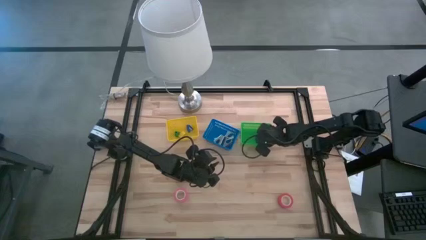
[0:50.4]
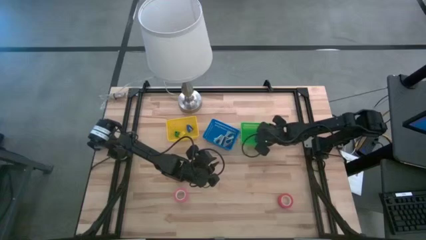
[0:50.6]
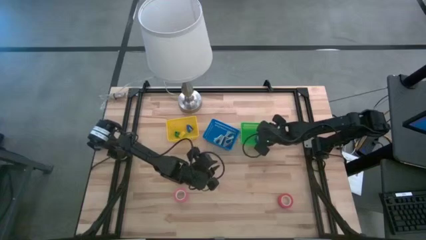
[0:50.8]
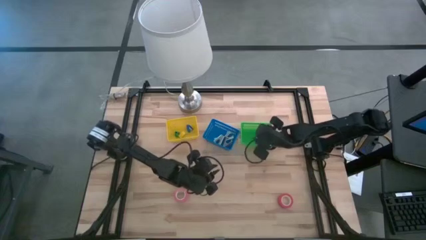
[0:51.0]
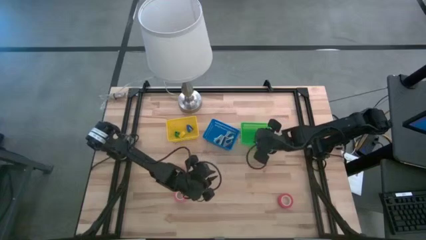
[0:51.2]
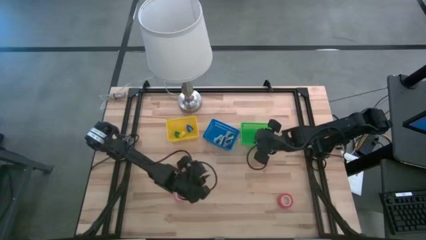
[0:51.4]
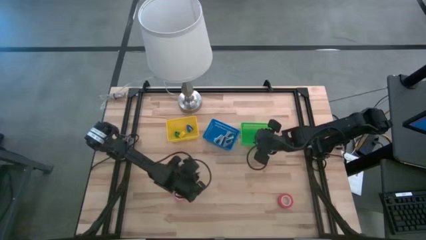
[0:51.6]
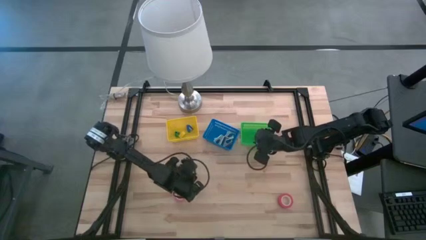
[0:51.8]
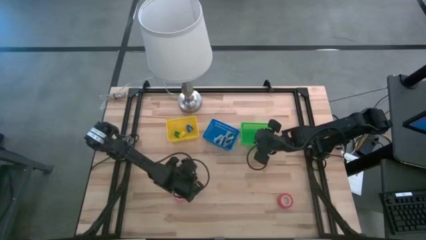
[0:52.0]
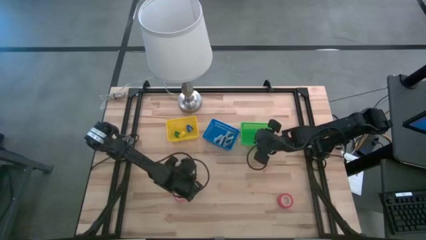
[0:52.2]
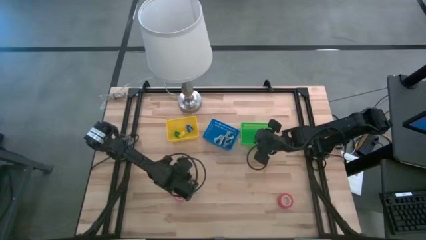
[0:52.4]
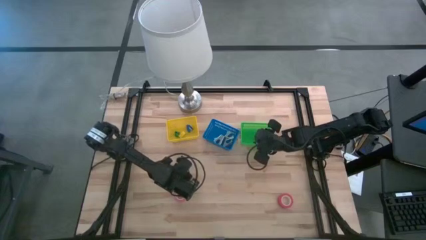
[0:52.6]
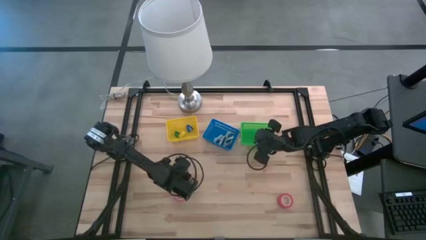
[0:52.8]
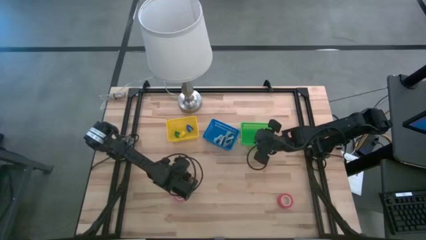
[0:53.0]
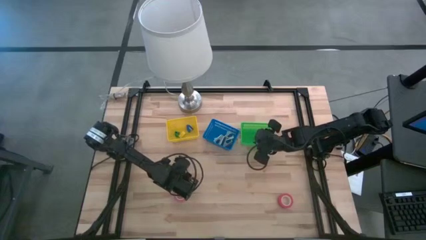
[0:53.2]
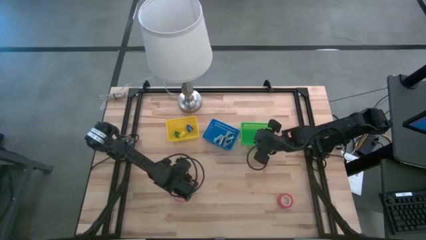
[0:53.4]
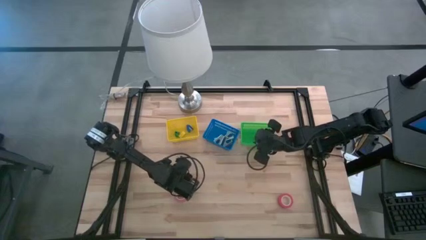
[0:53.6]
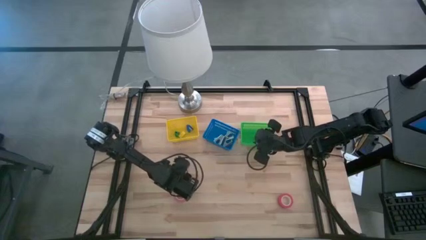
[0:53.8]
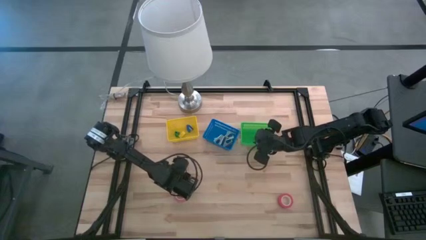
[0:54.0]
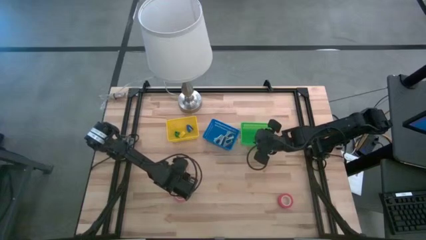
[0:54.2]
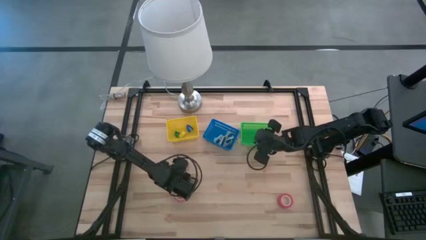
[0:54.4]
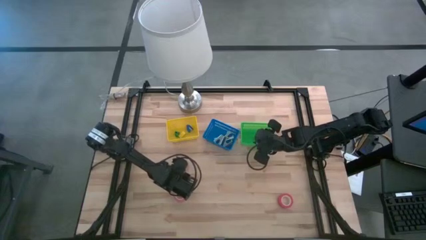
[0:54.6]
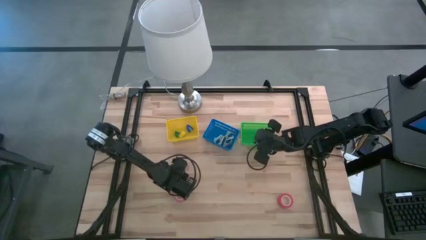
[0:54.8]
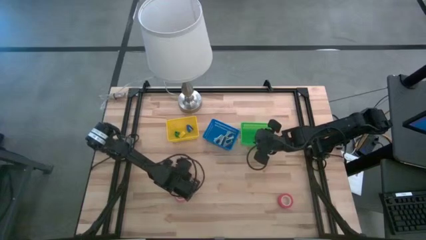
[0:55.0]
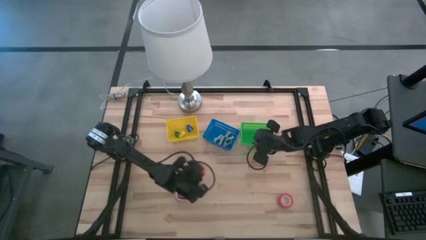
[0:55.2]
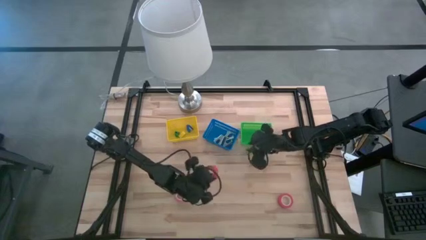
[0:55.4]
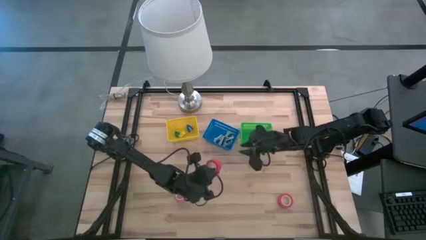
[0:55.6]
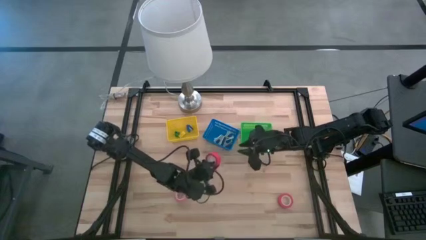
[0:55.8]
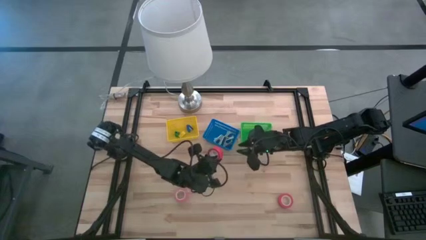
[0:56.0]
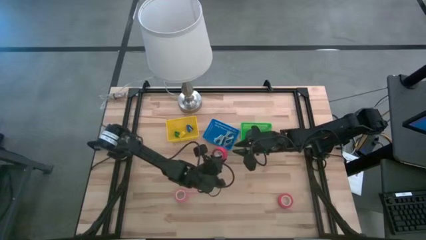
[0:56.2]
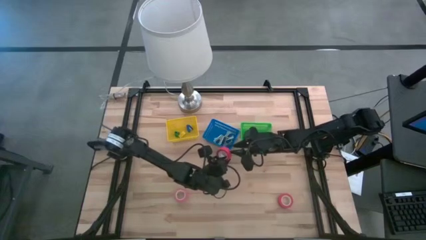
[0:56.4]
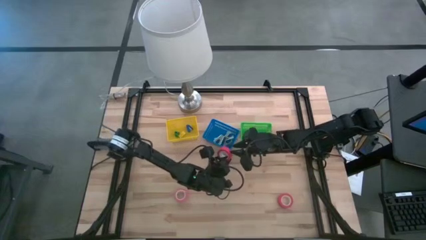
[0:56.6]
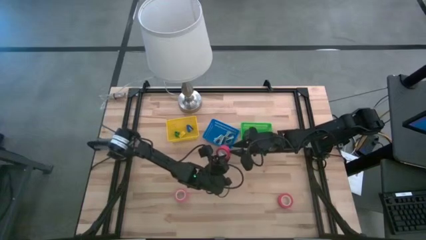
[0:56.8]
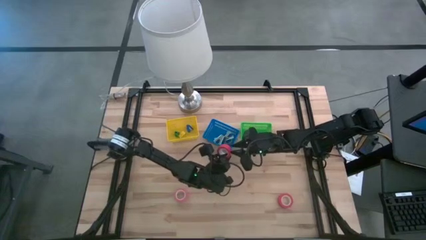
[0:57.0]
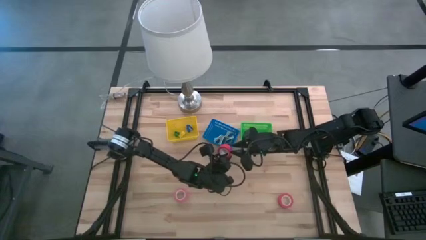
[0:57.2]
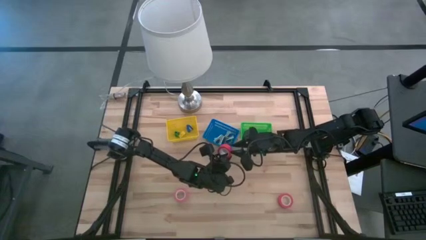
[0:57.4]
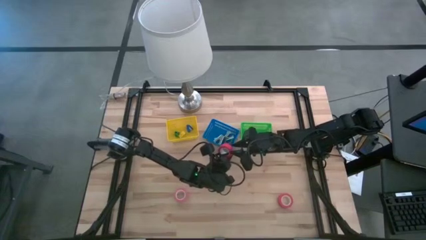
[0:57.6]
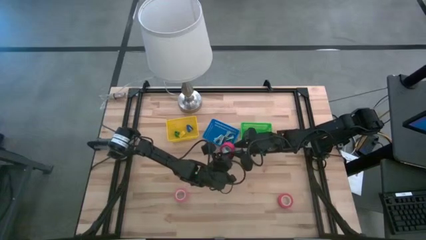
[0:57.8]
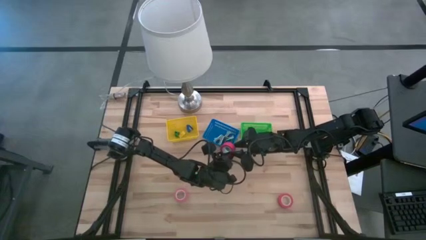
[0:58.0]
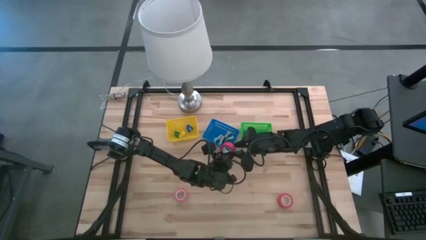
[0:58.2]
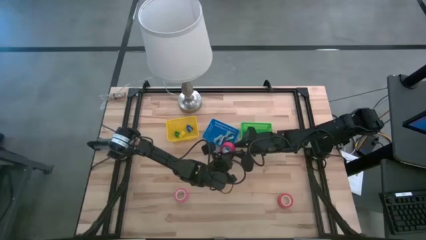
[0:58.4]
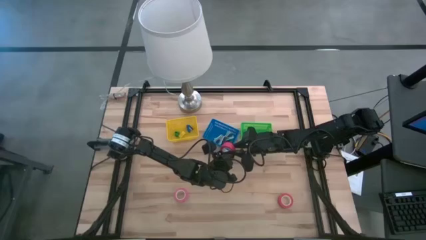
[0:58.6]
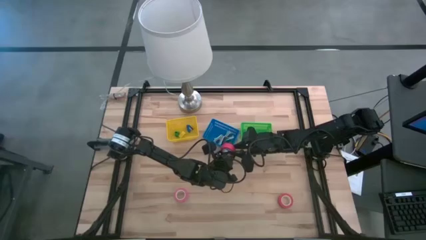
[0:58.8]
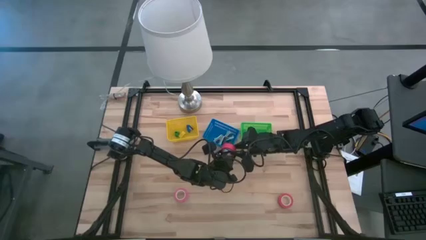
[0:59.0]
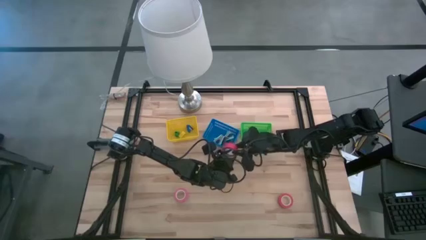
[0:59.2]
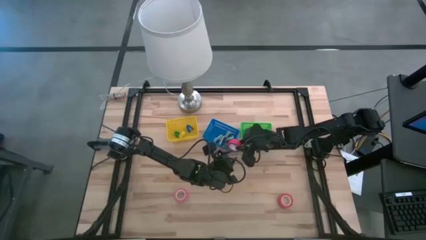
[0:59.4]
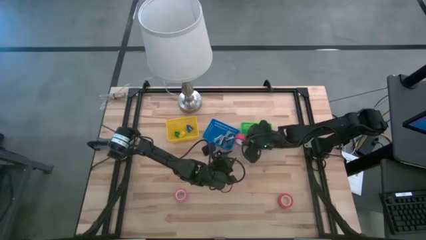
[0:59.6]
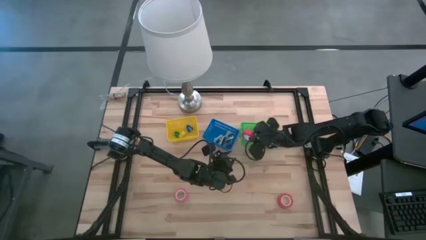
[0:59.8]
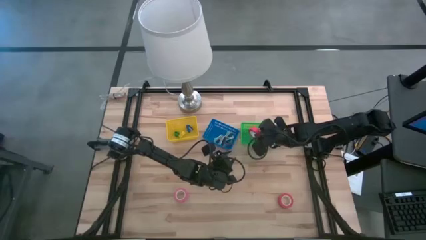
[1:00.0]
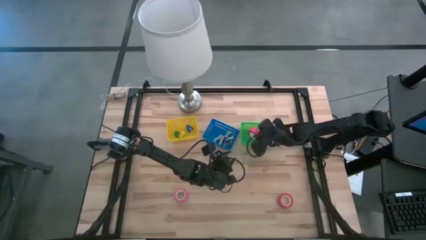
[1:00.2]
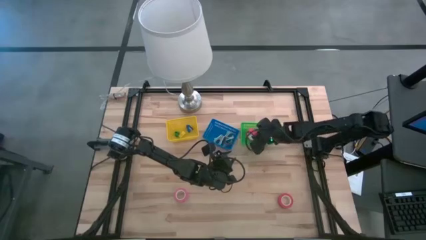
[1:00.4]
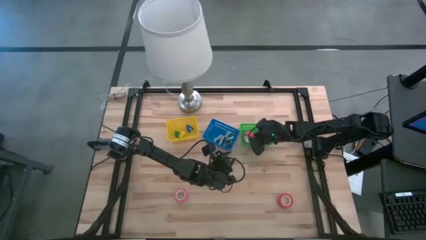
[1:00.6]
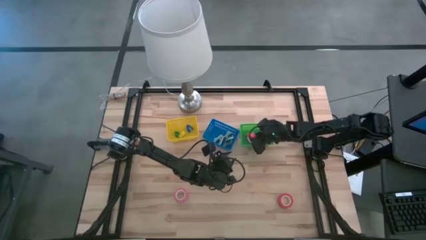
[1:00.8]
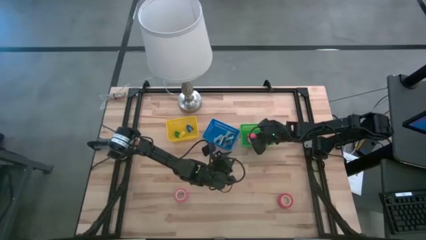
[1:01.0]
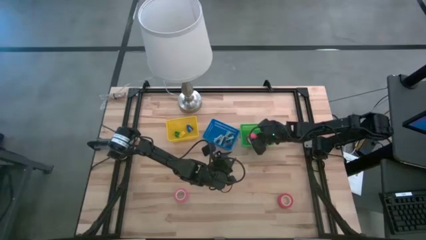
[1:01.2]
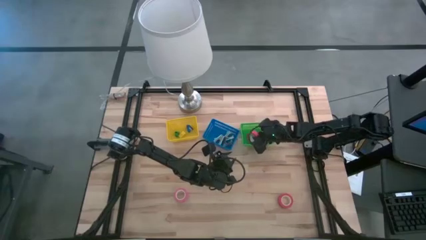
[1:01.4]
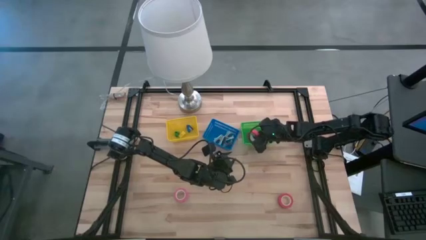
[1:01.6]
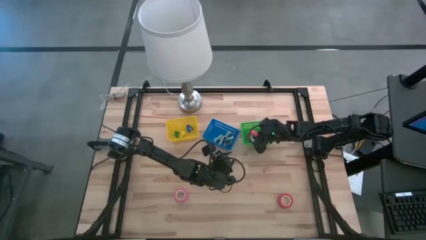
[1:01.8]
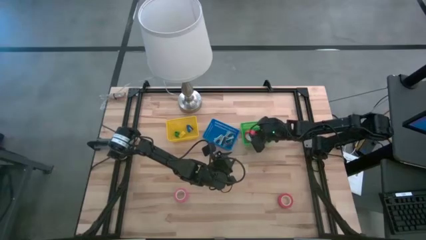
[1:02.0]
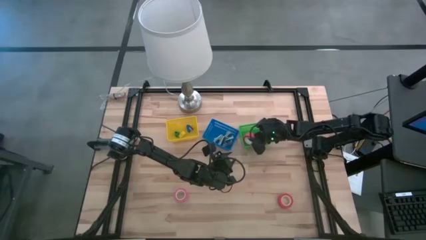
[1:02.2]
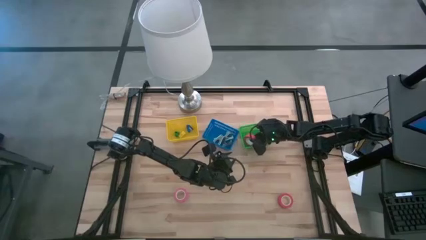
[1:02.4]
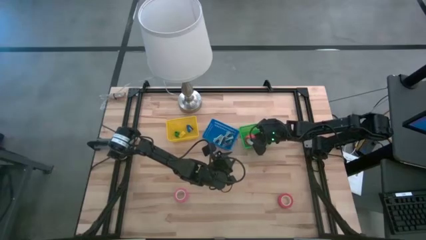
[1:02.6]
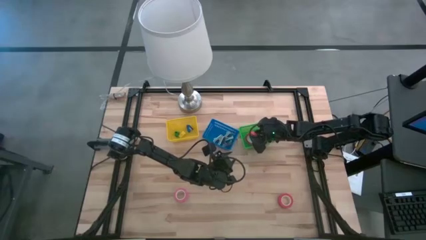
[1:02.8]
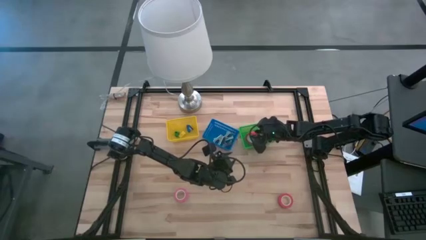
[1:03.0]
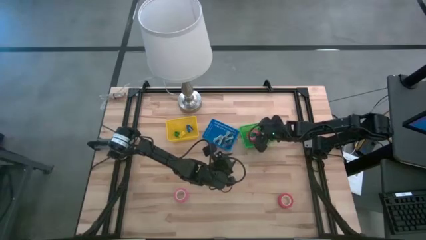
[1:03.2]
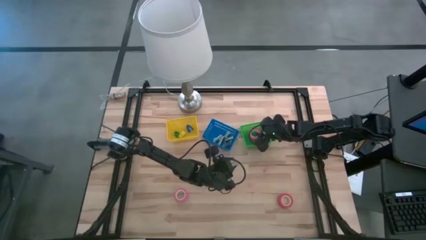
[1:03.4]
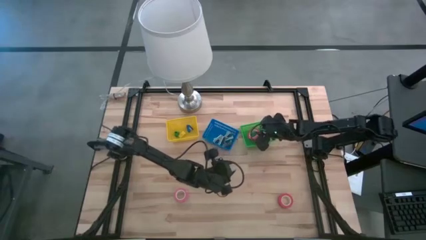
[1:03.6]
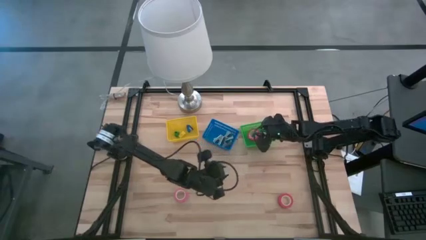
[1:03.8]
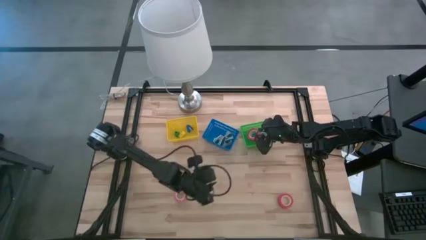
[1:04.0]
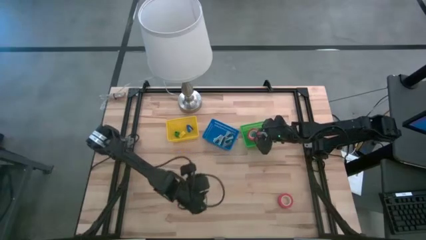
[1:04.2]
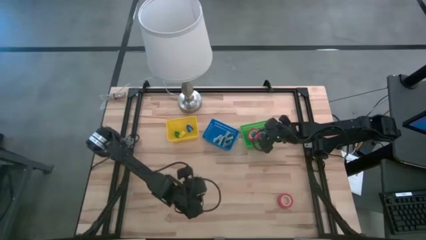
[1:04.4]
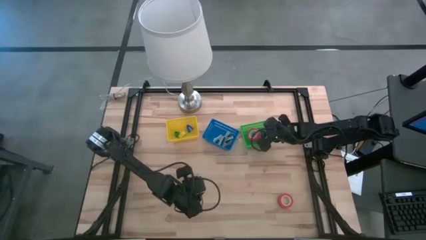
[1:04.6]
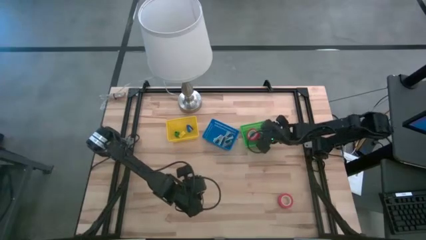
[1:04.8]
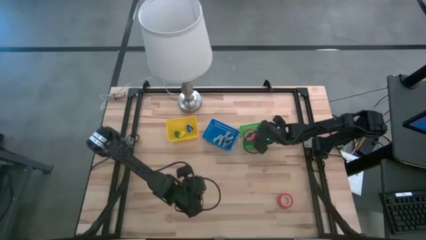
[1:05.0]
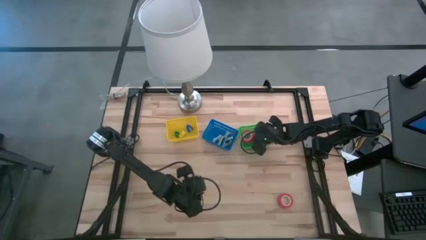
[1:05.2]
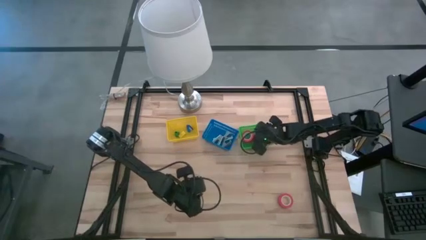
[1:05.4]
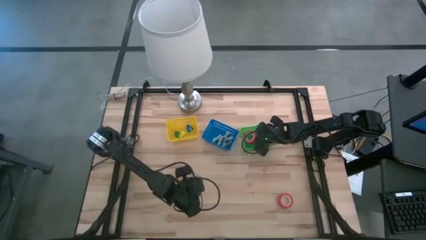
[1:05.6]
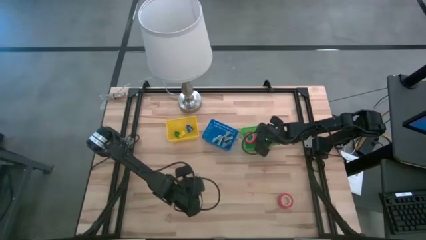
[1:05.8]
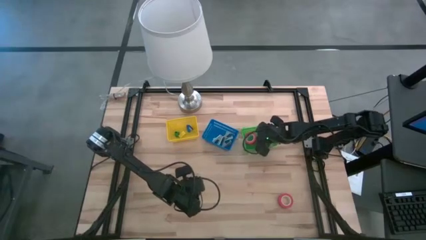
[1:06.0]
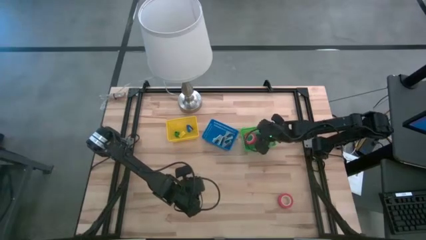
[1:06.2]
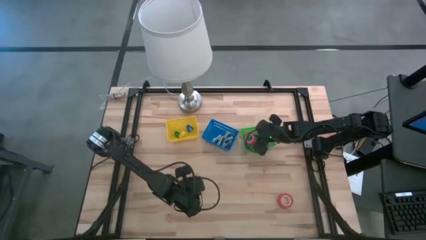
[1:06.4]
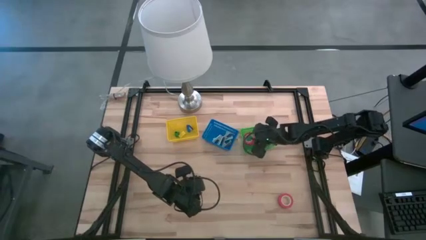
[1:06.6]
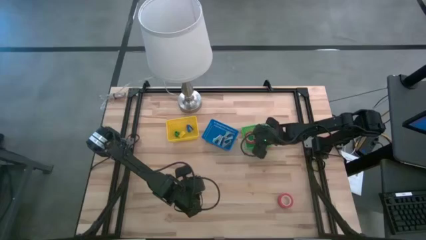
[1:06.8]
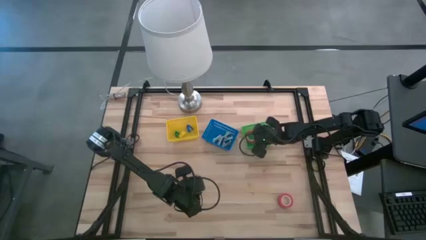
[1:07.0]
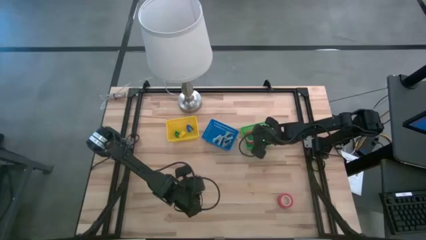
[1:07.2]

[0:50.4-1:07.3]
Task: Pick and place Stapler, Stapler remover, tape
Put the left red tape into the green bin
